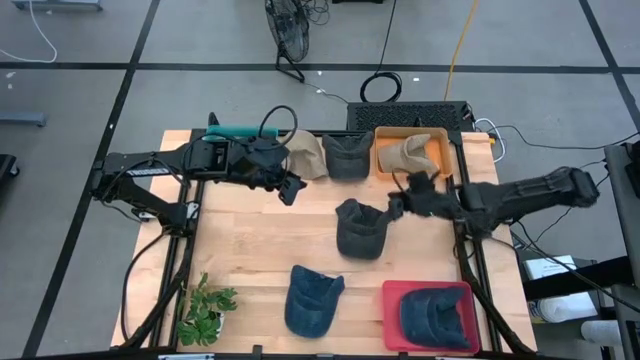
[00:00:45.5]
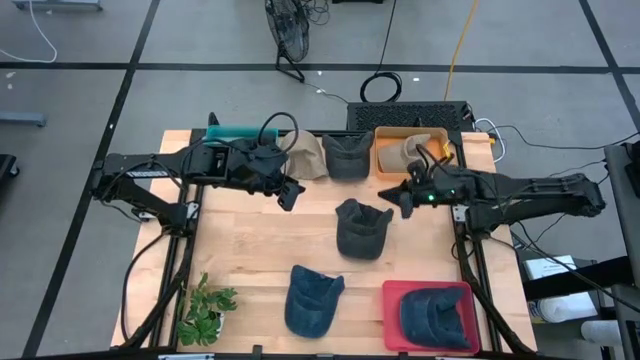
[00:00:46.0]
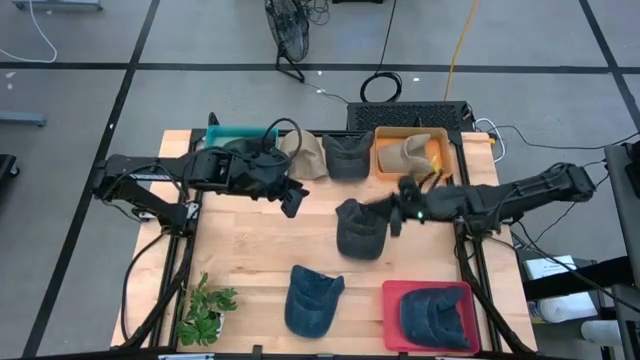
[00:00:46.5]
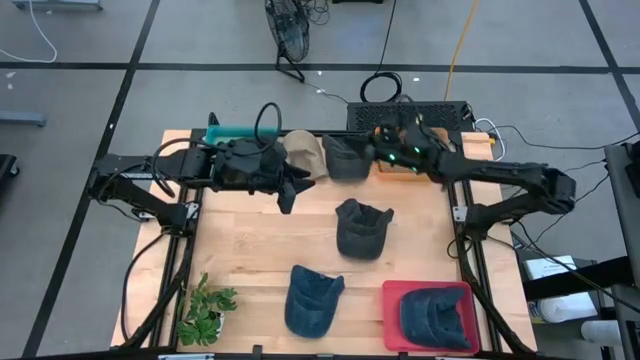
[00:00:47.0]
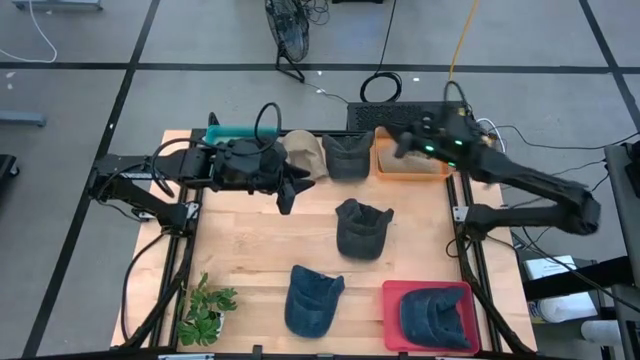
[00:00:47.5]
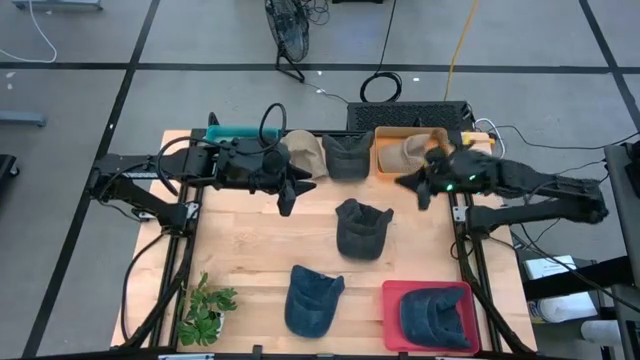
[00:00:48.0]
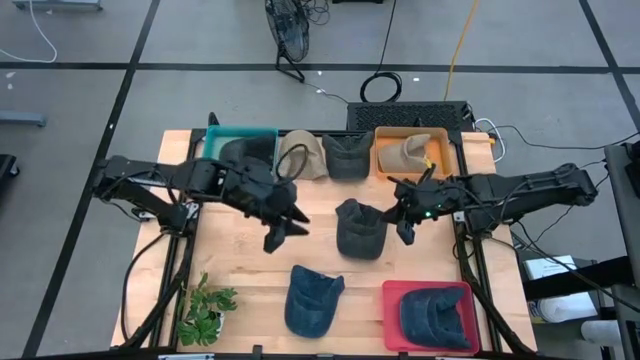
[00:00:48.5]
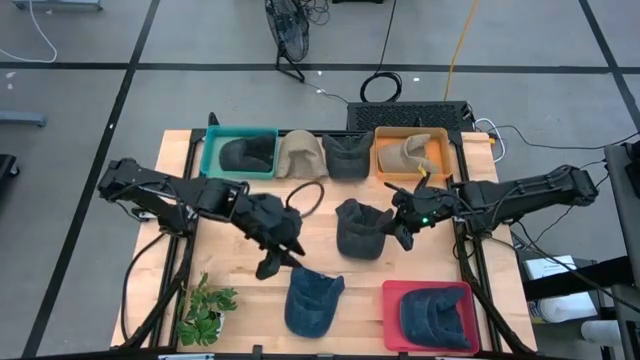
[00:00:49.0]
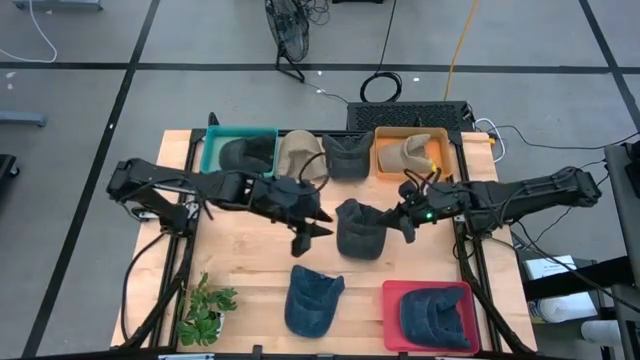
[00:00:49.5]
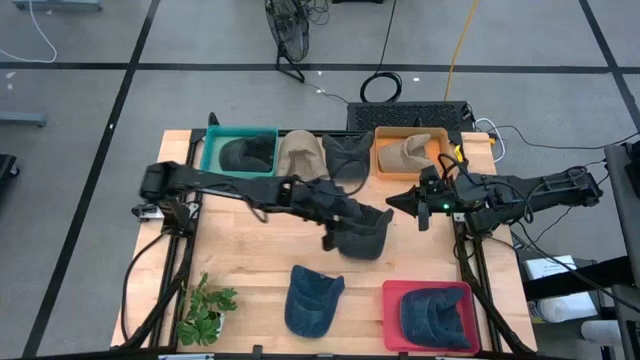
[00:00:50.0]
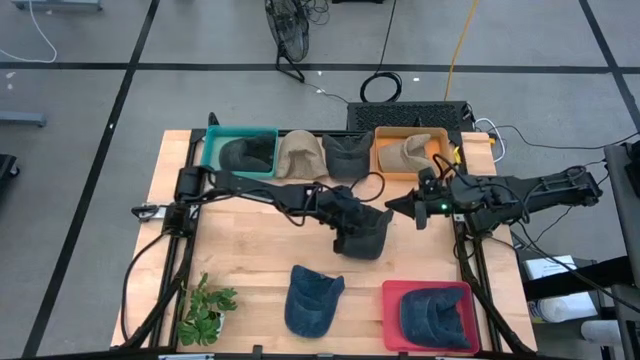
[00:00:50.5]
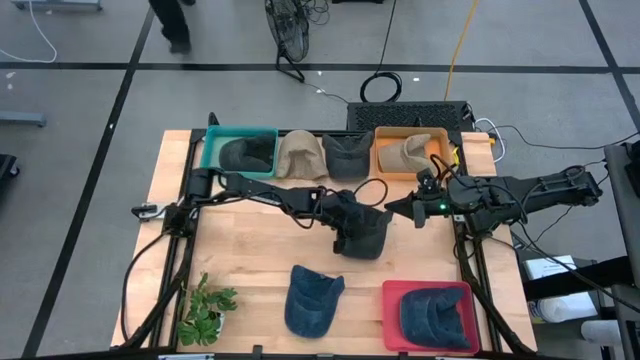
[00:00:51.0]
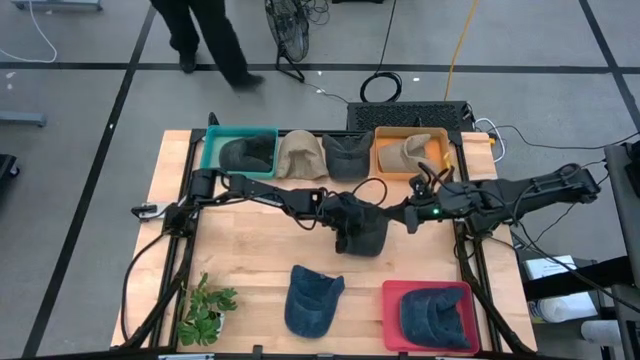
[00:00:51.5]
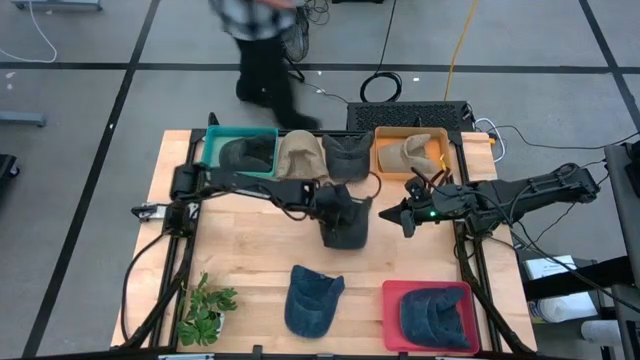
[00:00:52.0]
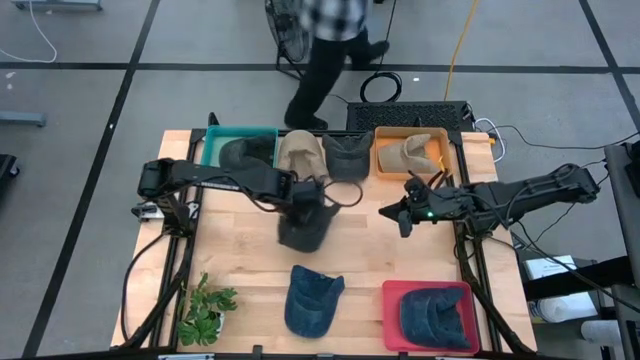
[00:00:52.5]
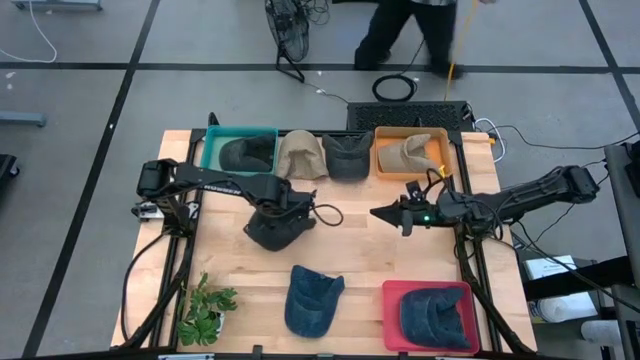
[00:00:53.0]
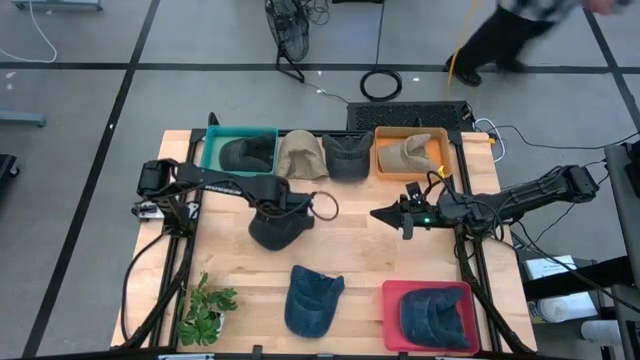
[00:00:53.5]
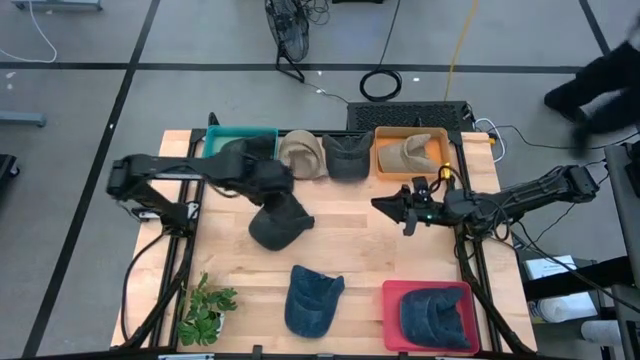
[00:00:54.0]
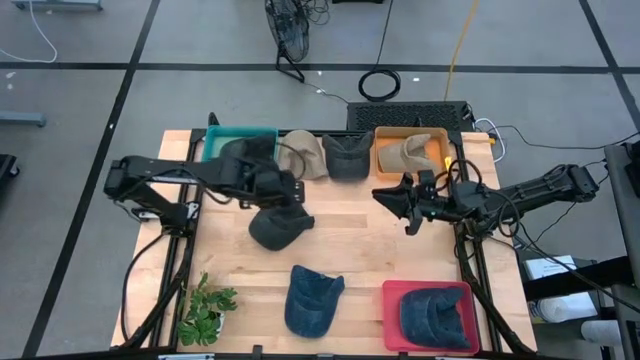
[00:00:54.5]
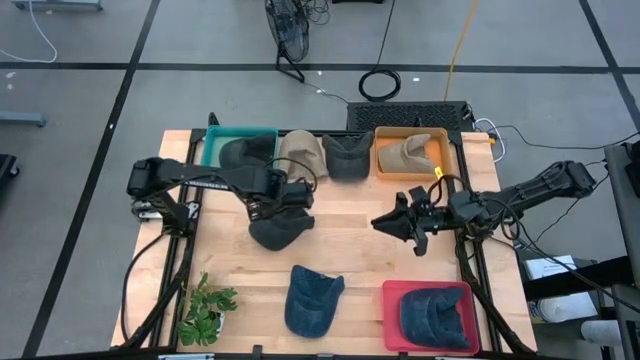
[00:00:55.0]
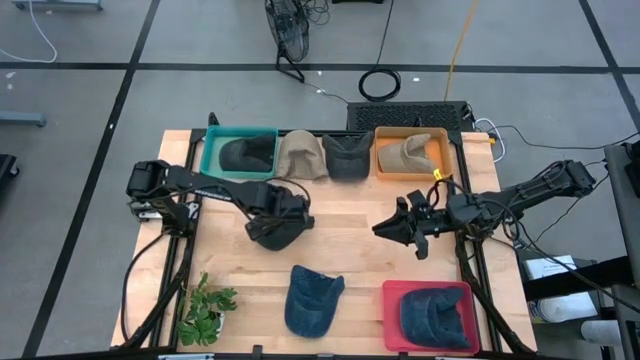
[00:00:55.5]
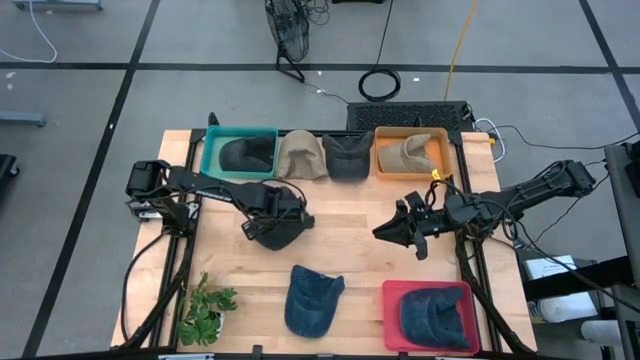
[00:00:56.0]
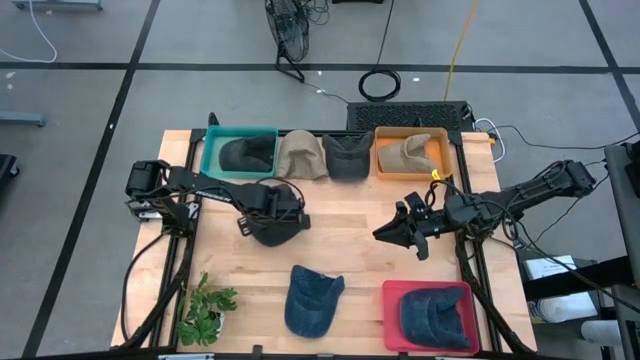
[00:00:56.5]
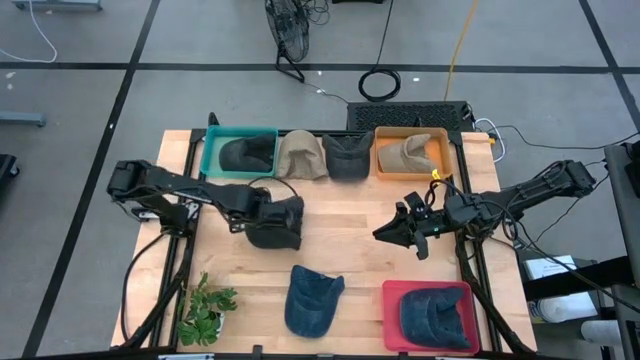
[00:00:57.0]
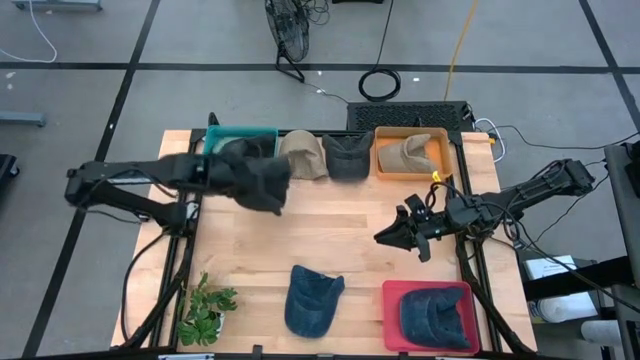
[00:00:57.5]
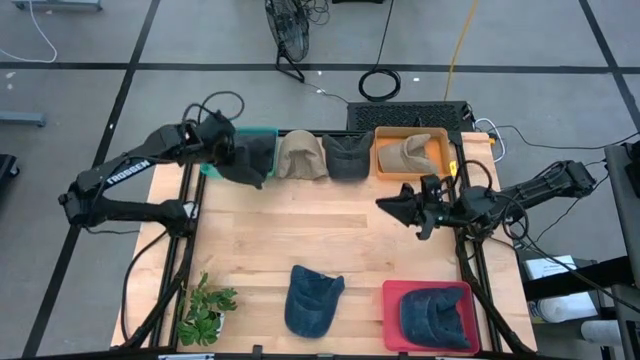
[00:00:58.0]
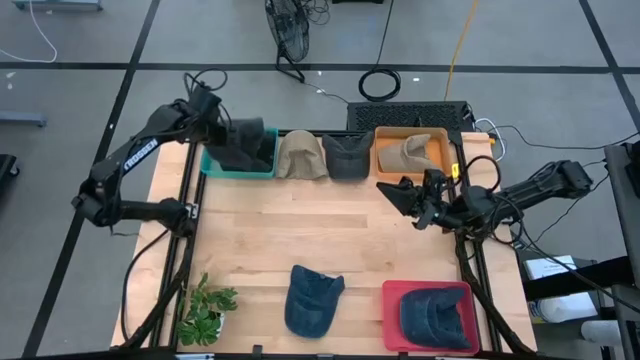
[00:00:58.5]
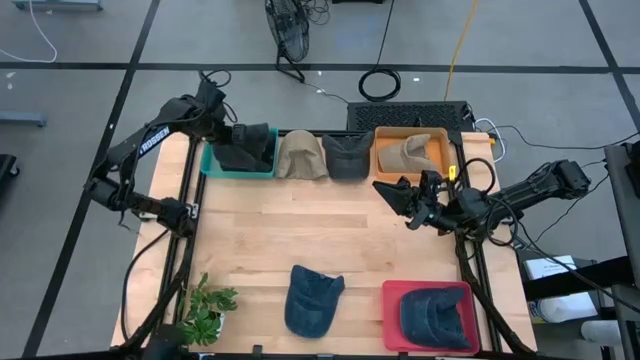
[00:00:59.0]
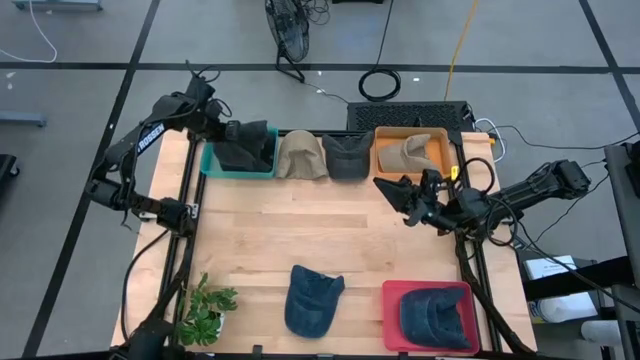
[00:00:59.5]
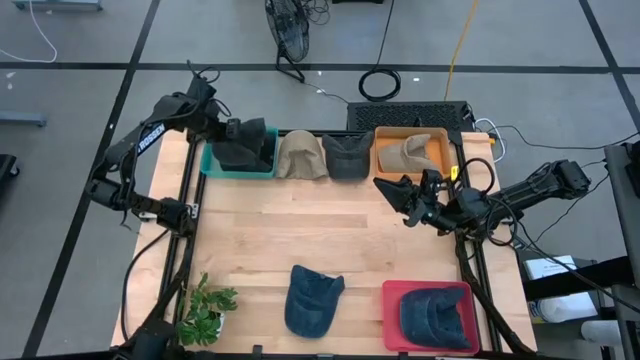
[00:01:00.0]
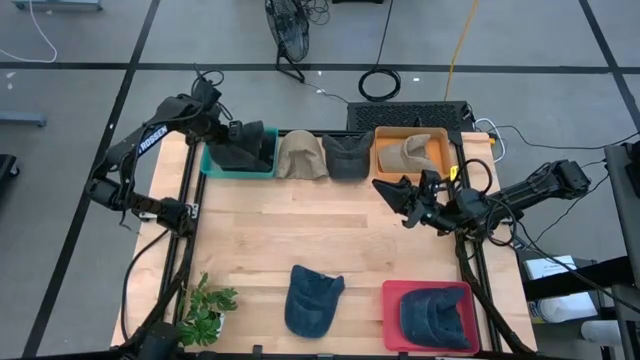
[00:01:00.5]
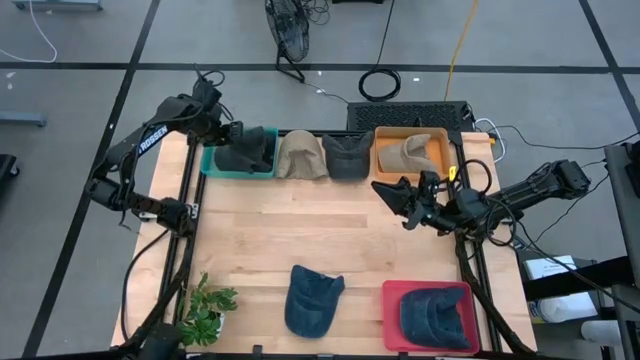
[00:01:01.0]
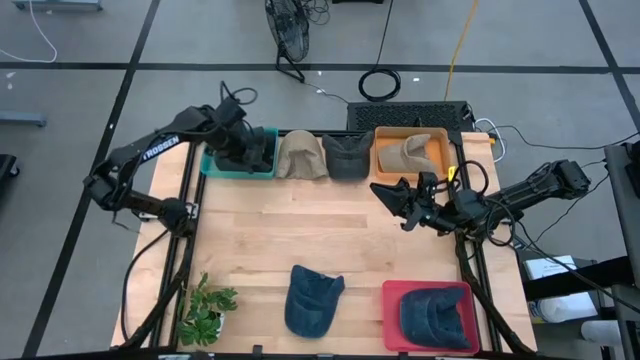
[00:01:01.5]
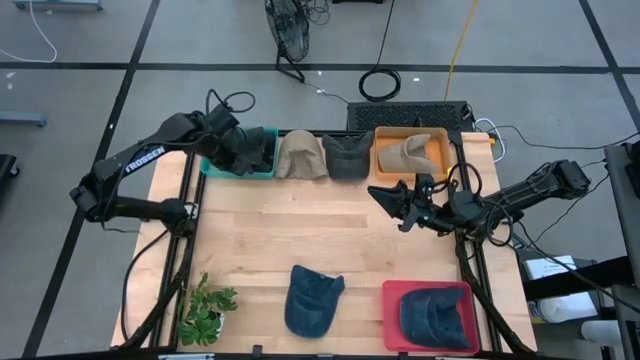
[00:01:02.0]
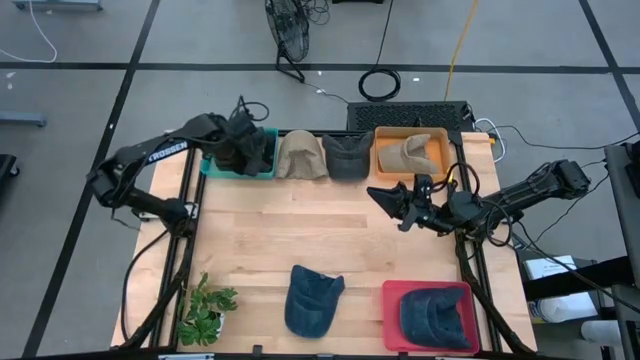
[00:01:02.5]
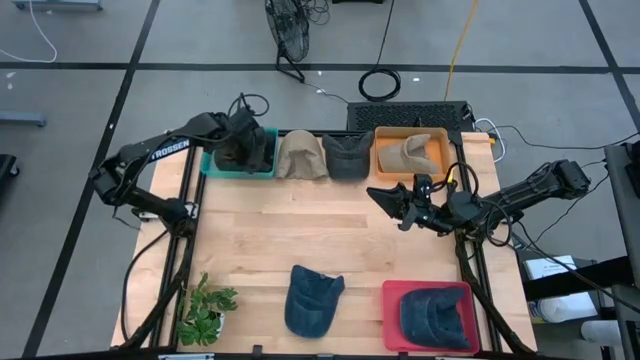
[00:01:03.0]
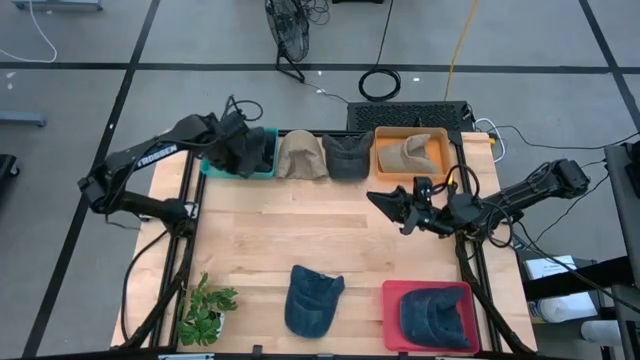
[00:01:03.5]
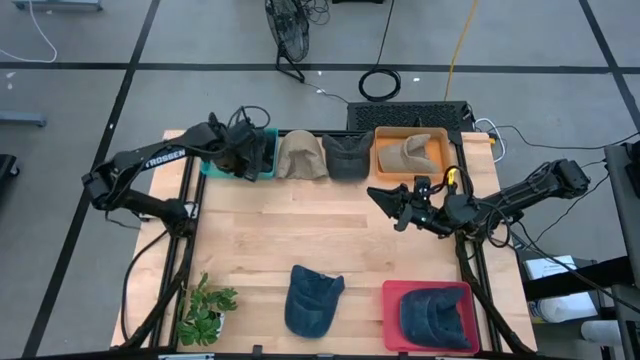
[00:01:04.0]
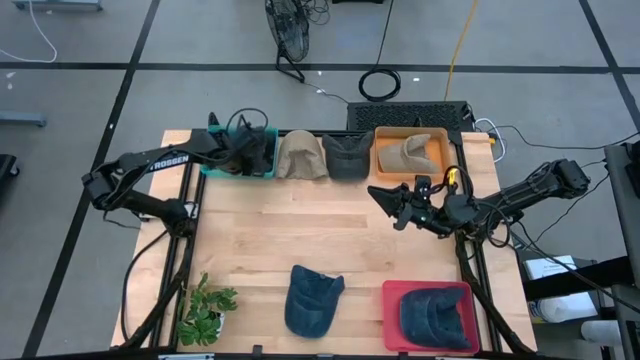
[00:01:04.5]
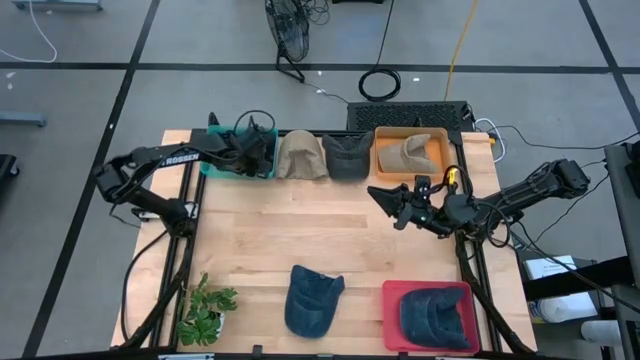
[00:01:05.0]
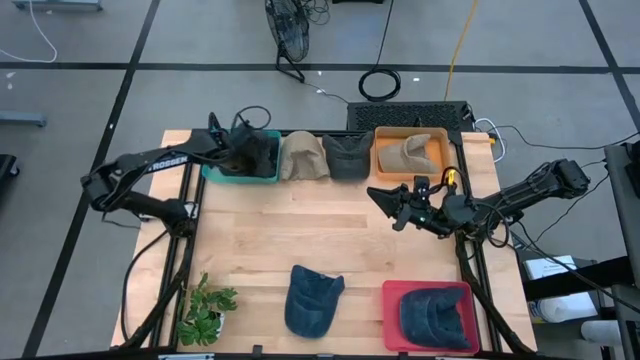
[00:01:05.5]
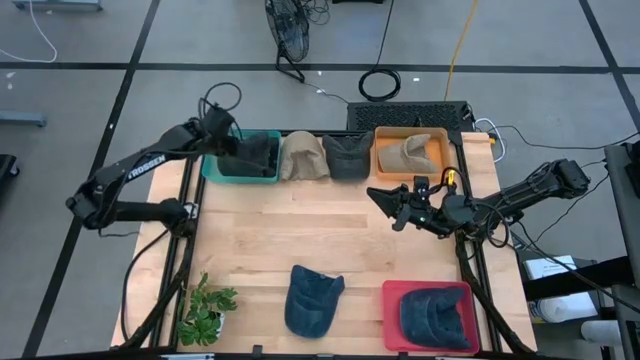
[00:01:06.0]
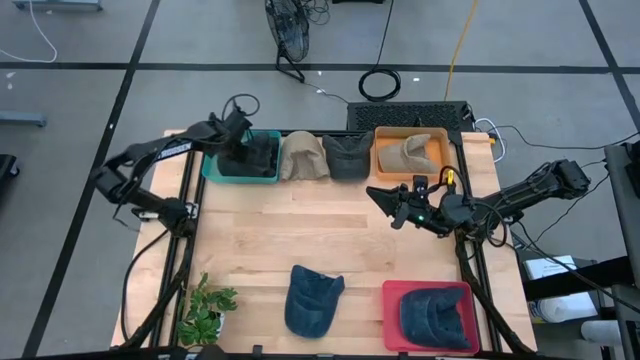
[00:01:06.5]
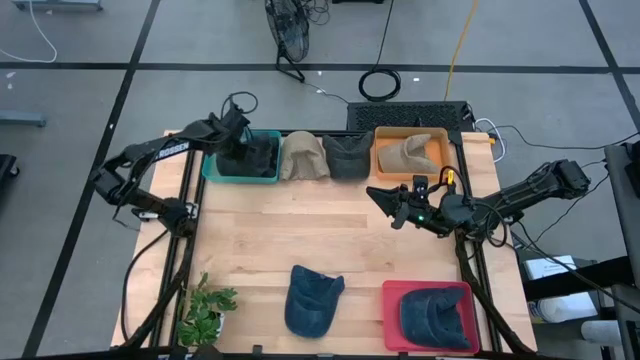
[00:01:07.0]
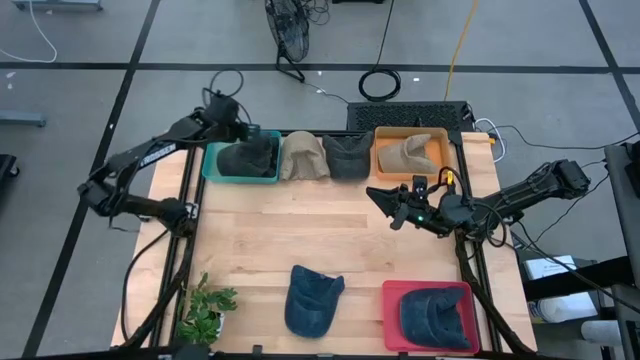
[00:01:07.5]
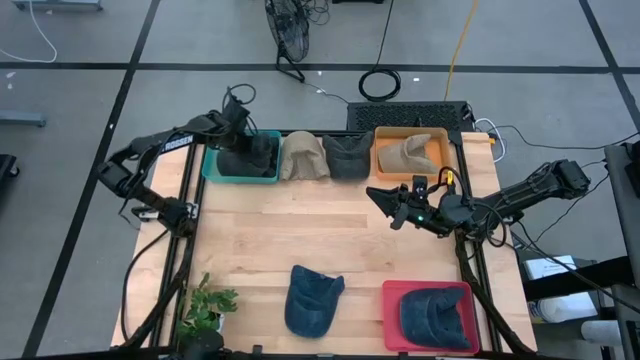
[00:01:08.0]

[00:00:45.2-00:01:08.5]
Task: Pick & Place hat
Put the bottom black cap into the green bin
